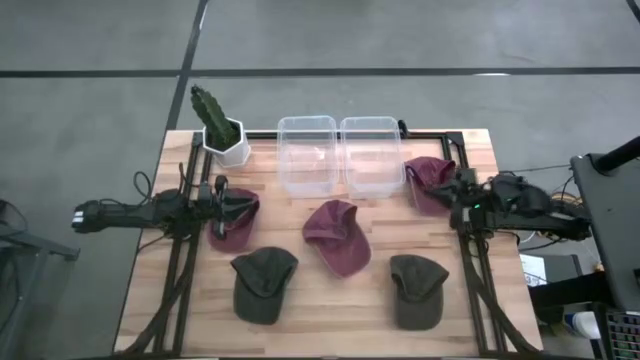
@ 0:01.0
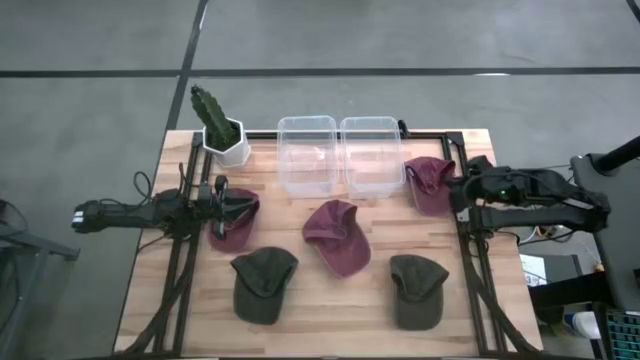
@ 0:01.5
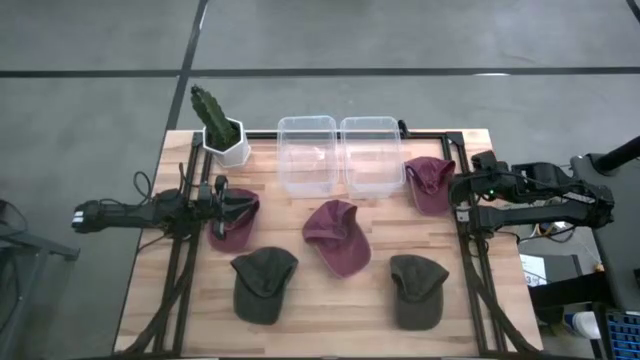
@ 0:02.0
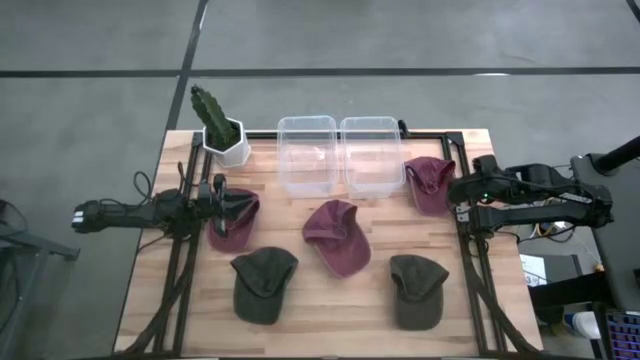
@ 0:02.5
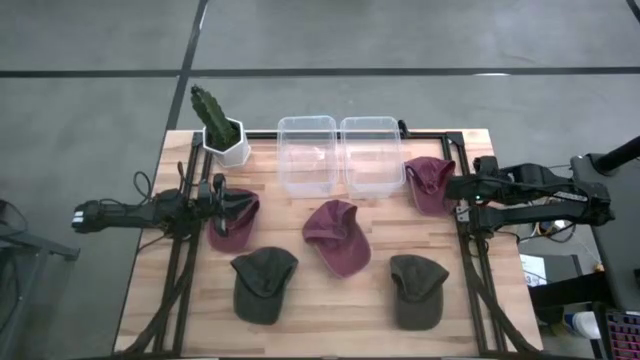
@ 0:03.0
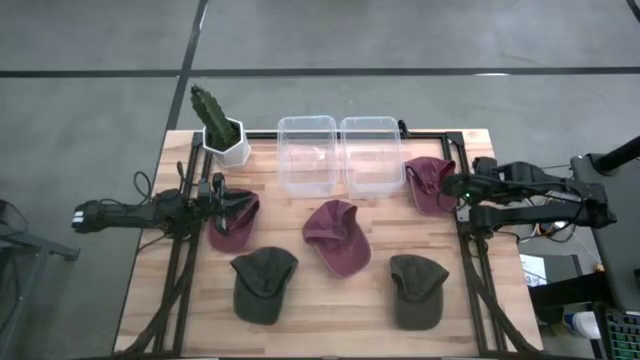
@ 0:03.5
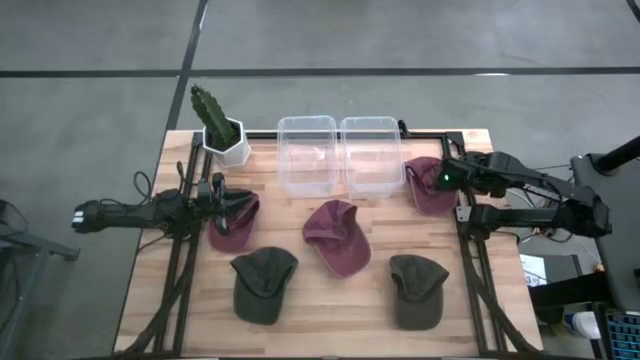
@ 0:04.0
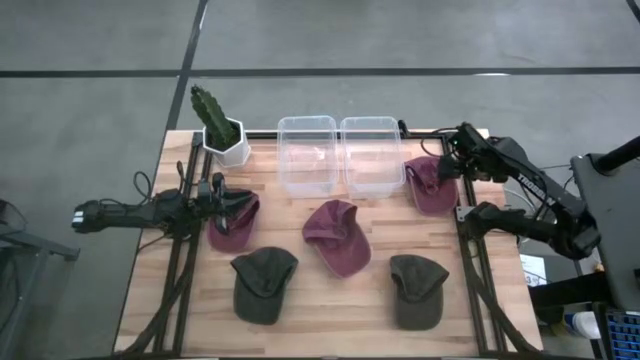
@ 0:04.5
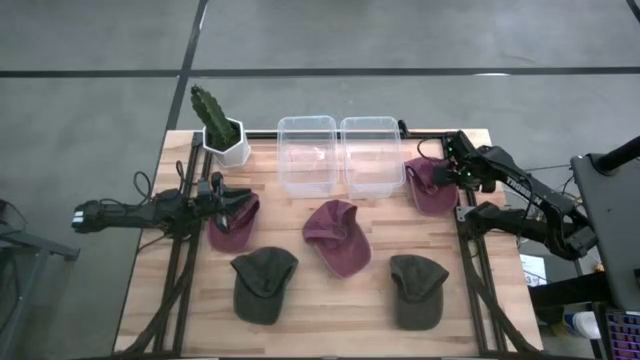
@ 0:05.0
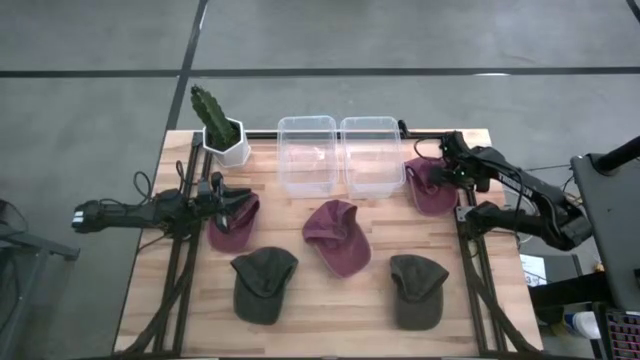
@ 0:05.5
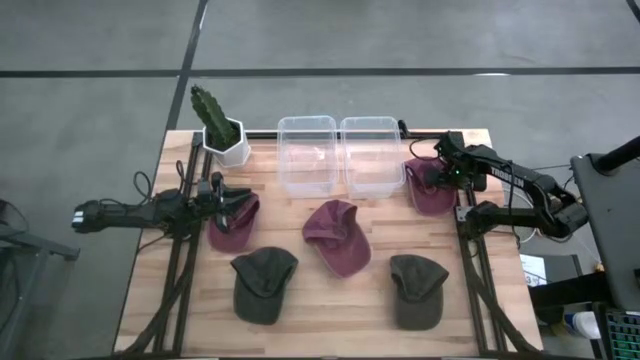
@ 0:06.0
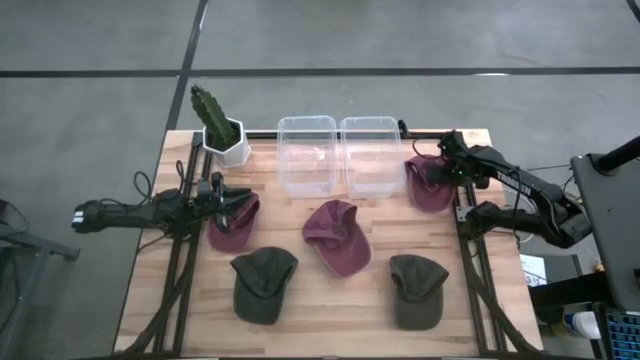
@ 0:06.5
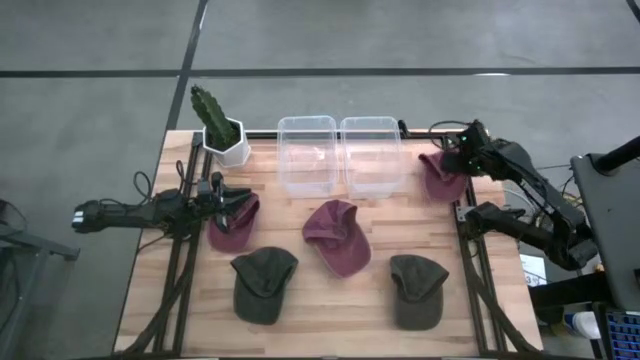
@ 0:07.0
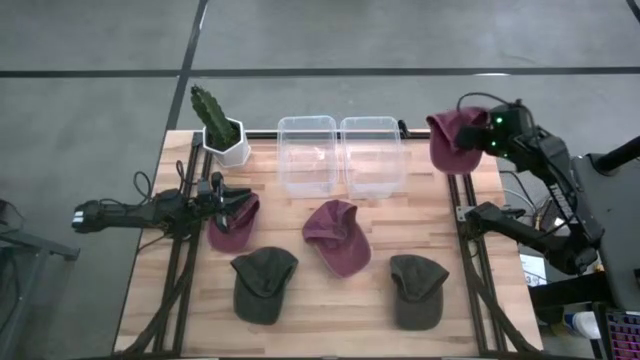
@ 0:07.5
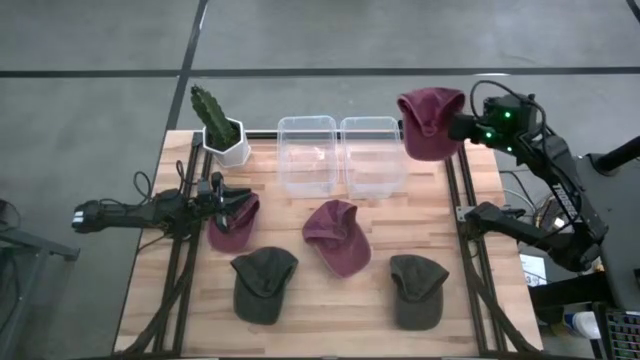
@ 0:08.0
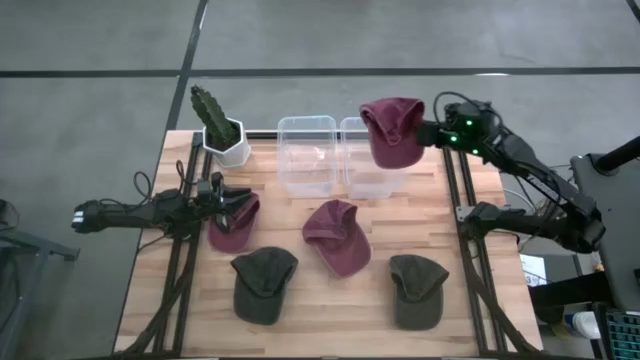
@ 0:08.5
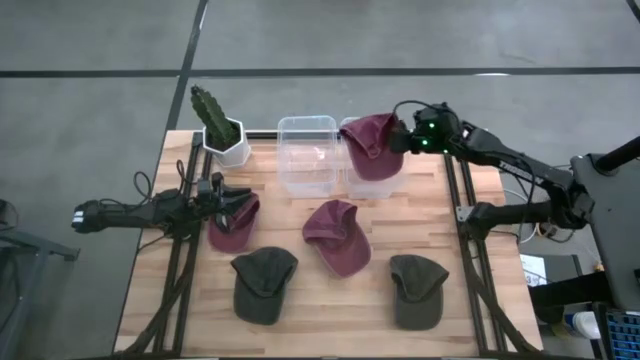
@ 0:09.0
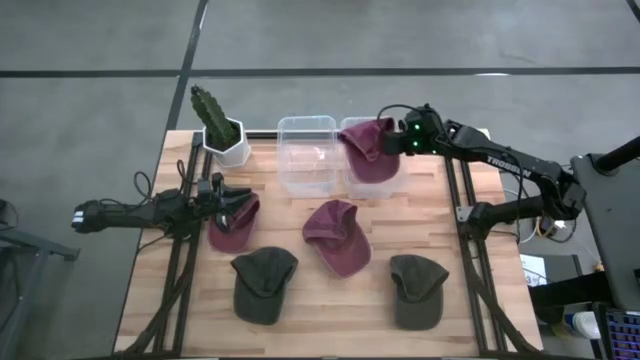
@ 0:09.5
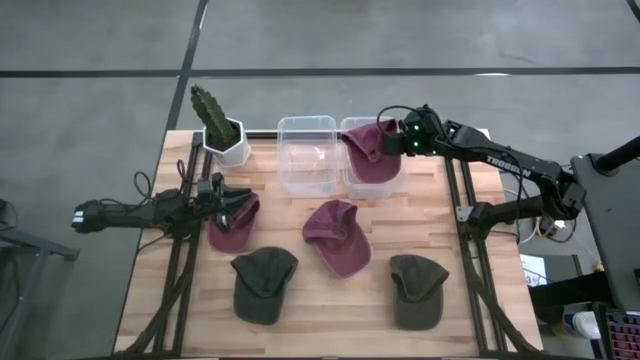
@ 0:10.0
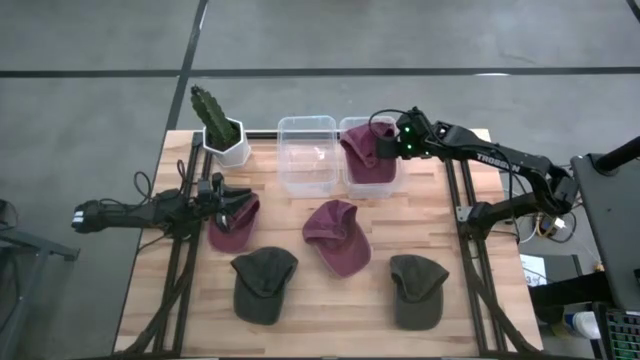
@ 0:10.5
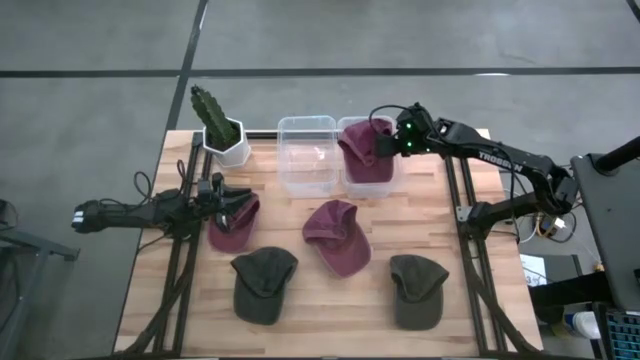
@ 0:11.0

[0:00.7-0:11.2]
Task: Pick & Place hat
Put the top right red cap into the right transparent bin

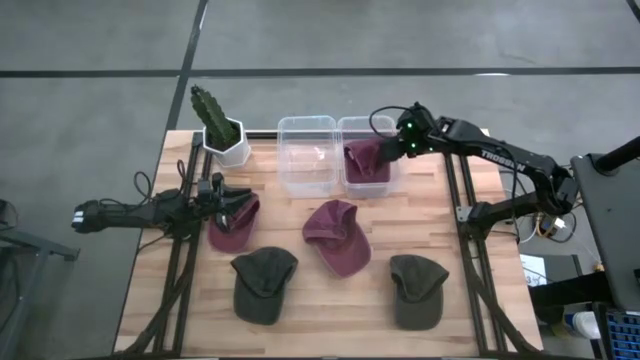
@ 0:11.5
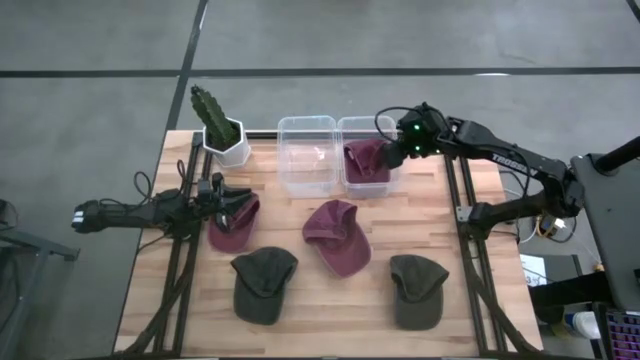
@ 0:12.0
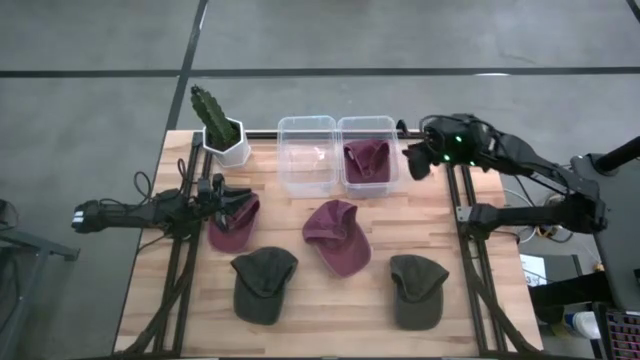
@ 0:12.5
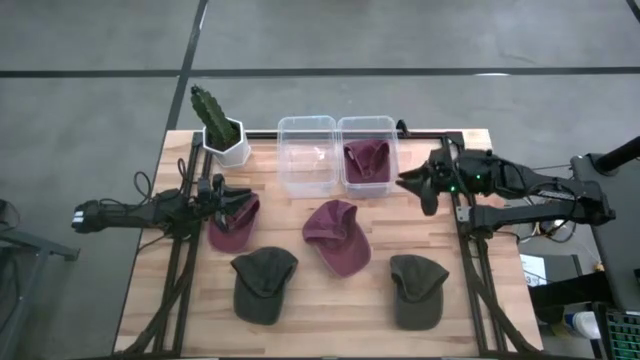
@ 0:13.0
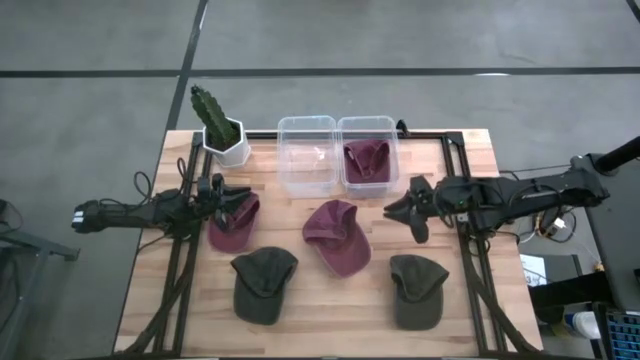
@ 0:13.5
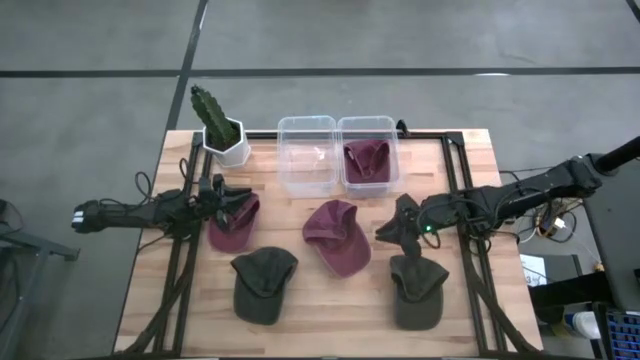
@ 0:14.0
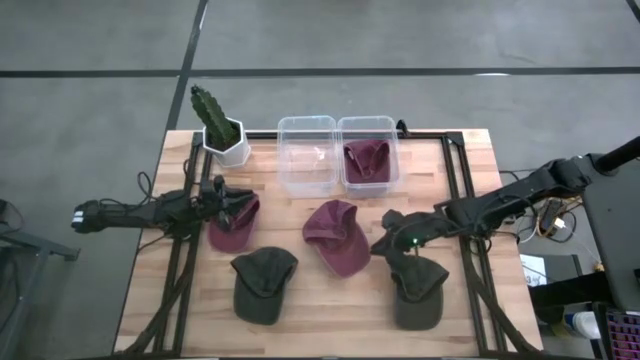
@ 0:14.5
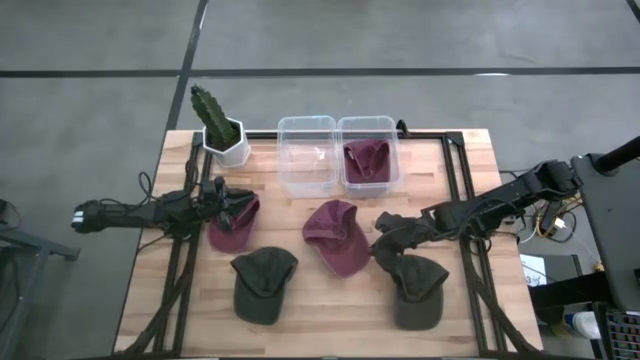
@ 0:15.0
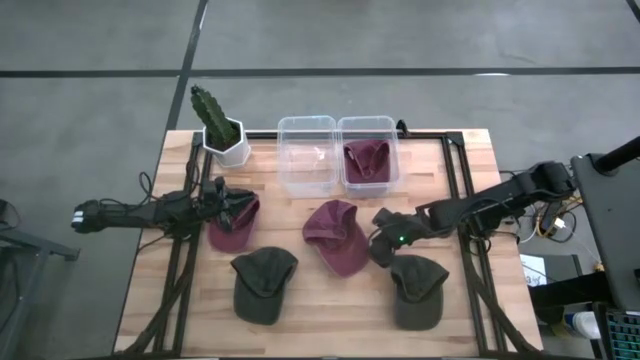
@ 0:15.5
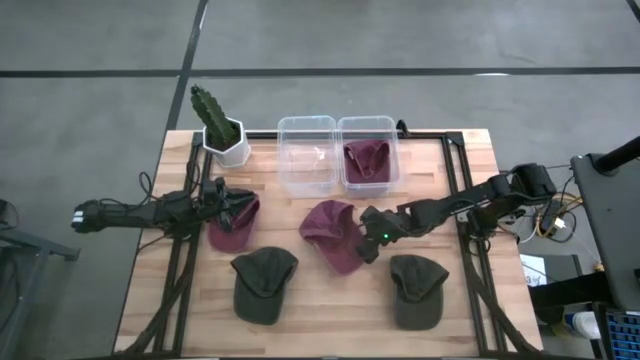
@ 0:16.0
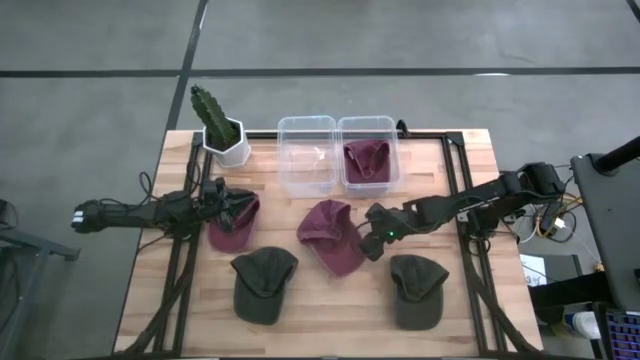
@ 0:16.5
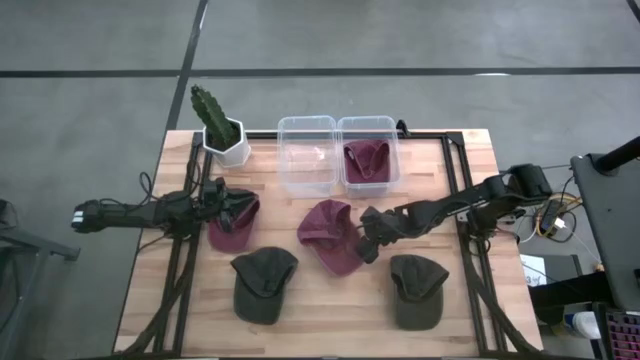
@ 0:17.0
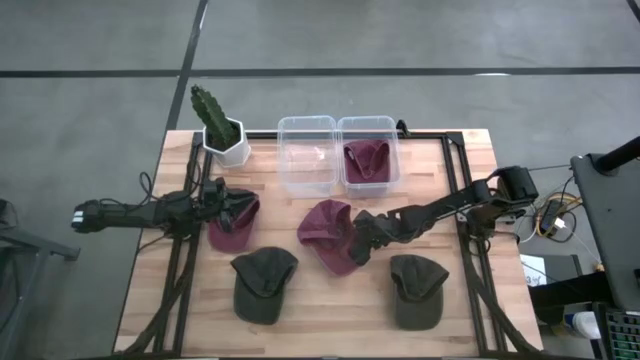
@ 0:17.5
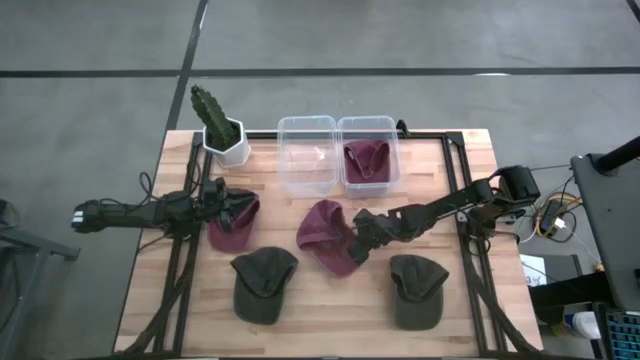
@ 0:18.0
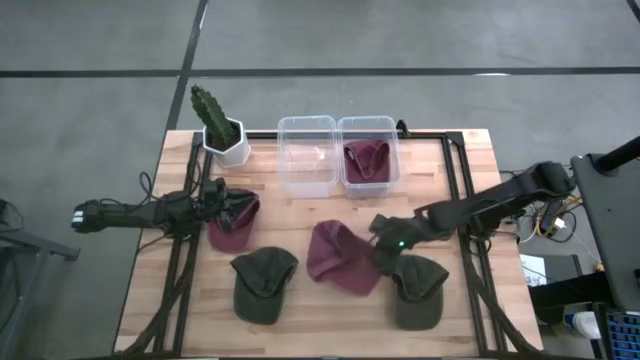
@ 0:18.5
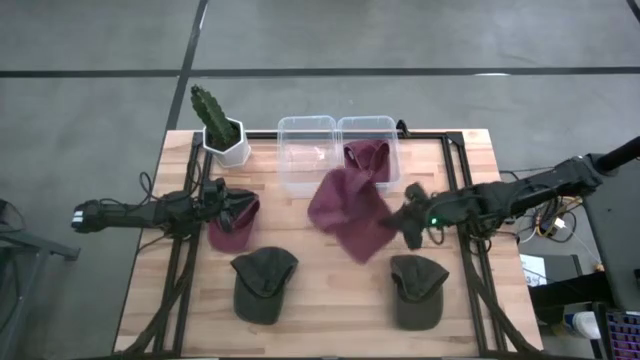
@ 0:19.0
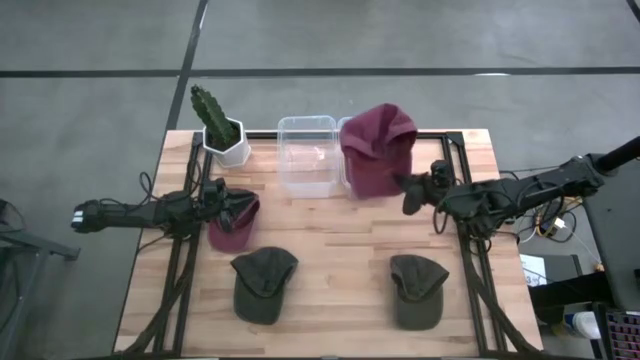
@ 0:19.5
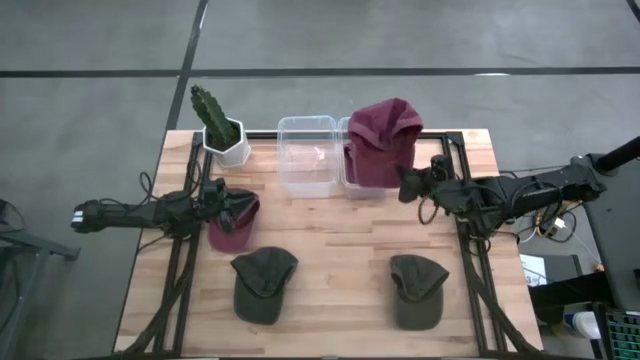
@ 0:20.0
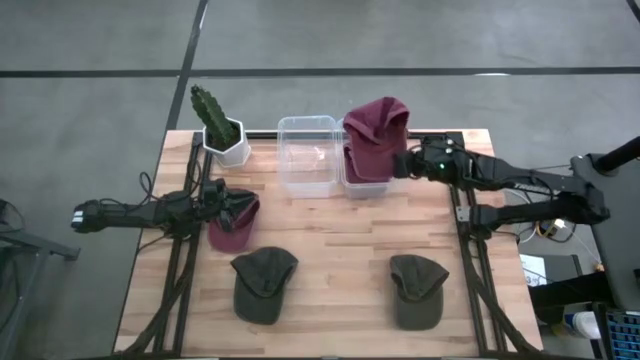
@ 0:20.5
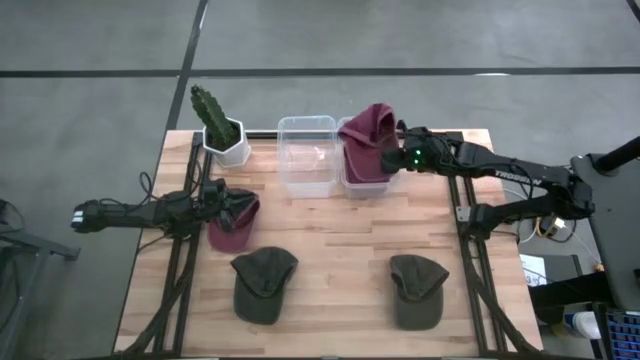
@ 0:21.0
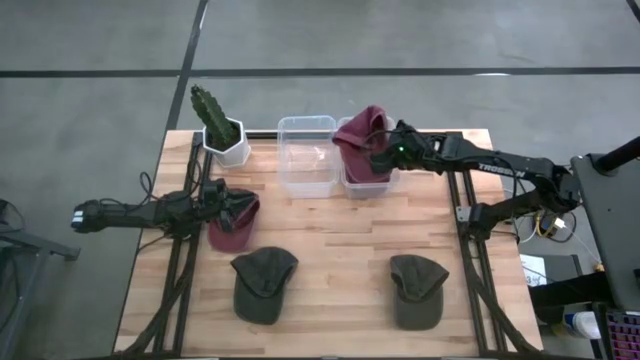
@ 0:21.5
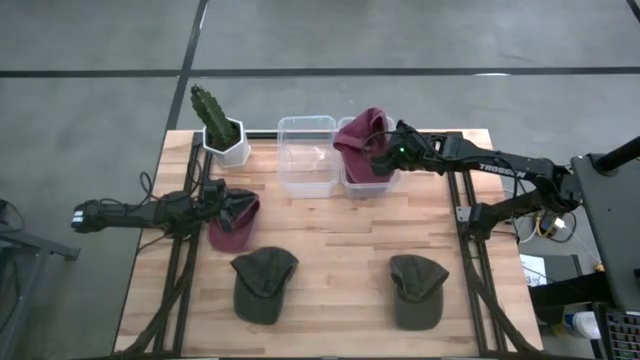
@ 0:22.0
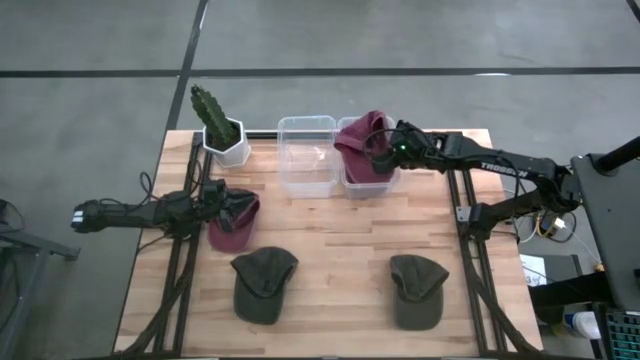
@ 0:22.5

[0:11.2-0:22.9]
Put the right red cap into the right transparent bin
